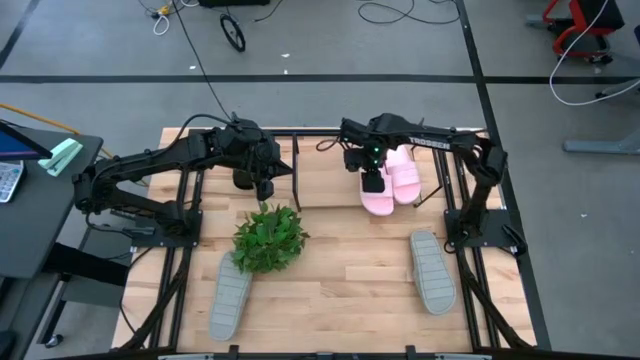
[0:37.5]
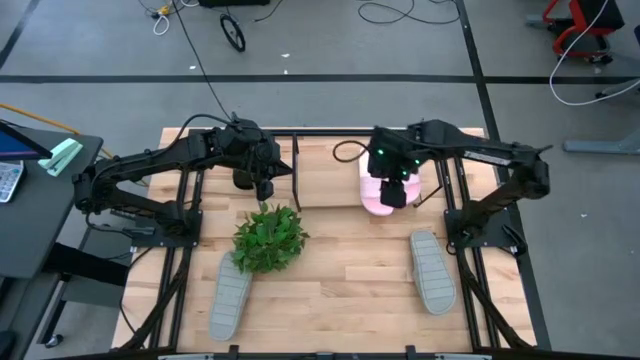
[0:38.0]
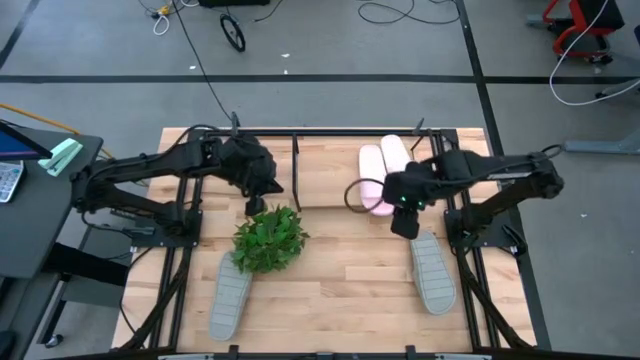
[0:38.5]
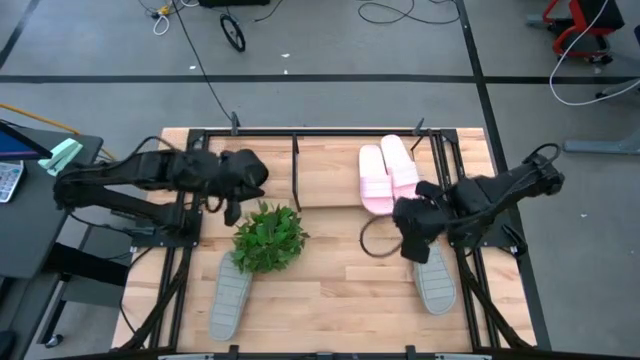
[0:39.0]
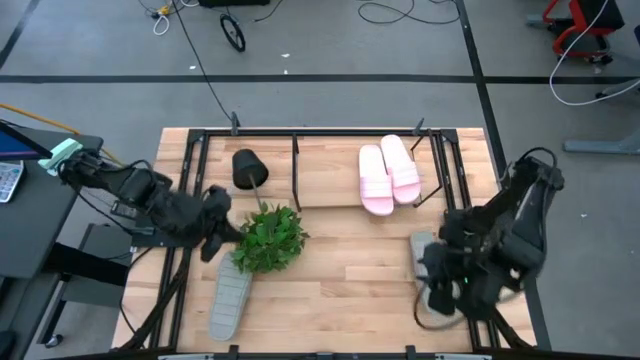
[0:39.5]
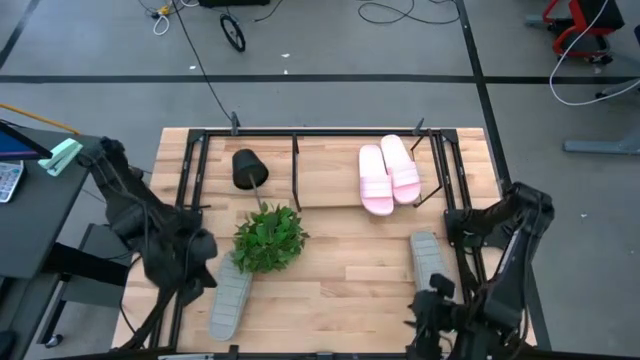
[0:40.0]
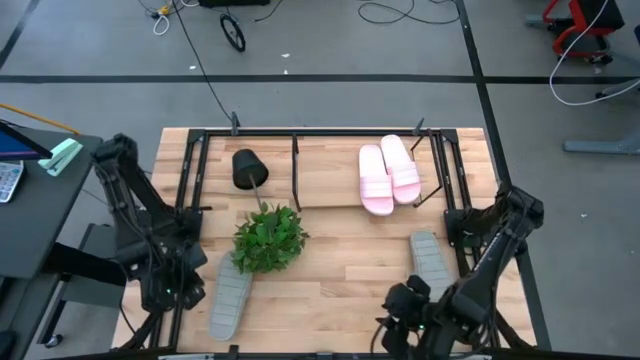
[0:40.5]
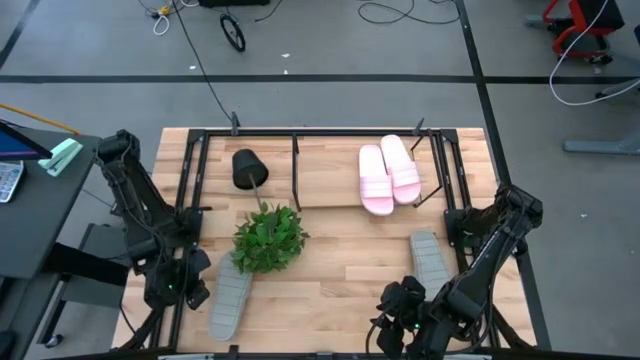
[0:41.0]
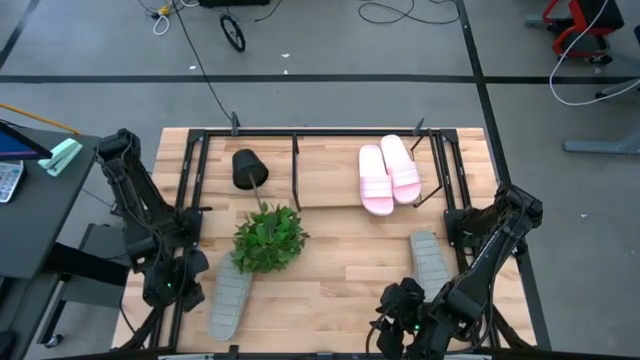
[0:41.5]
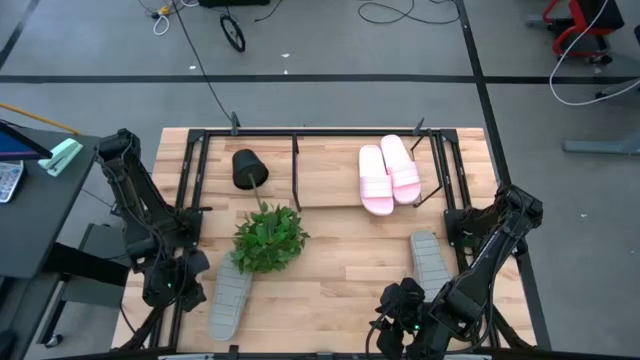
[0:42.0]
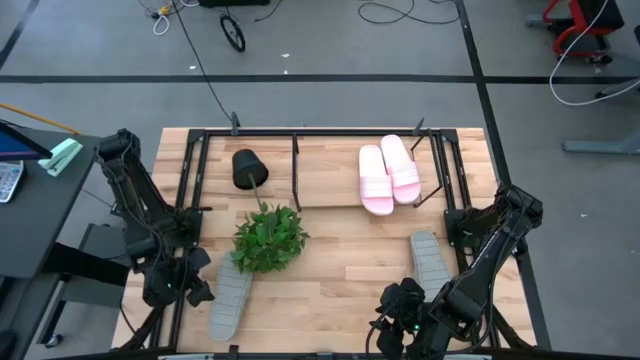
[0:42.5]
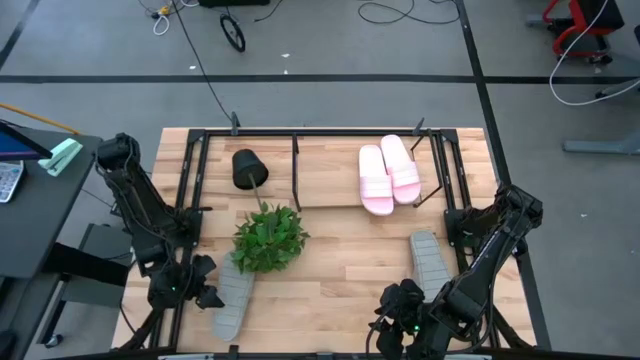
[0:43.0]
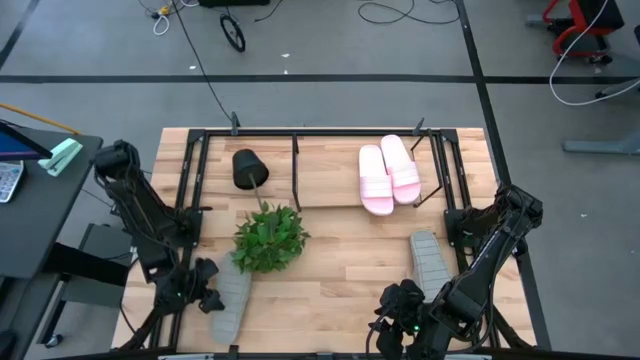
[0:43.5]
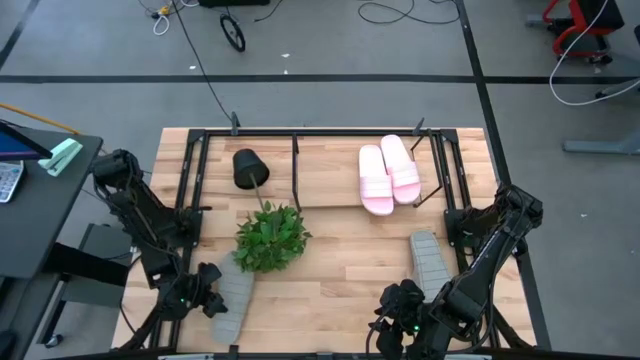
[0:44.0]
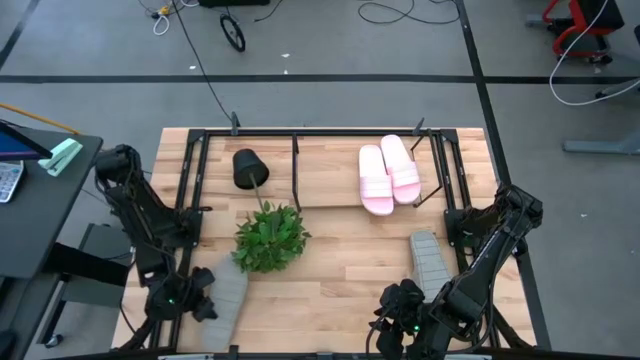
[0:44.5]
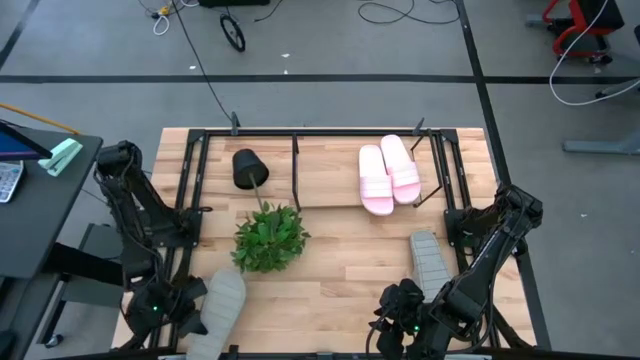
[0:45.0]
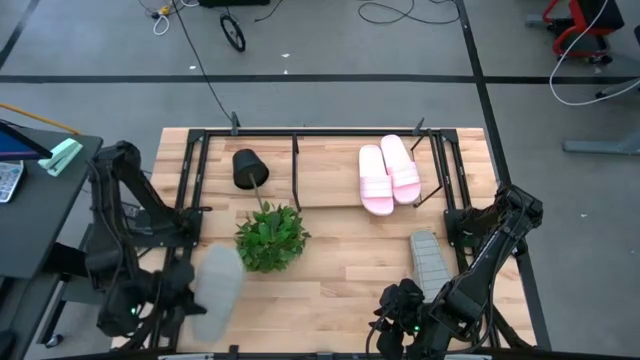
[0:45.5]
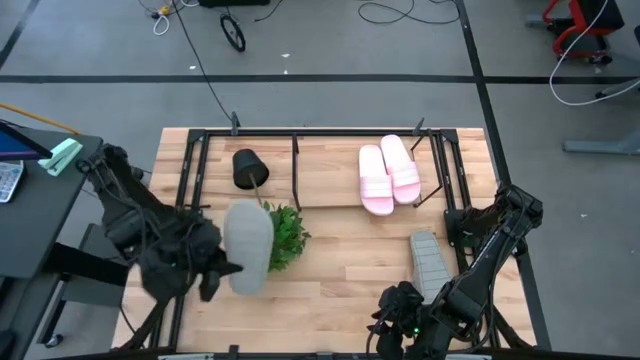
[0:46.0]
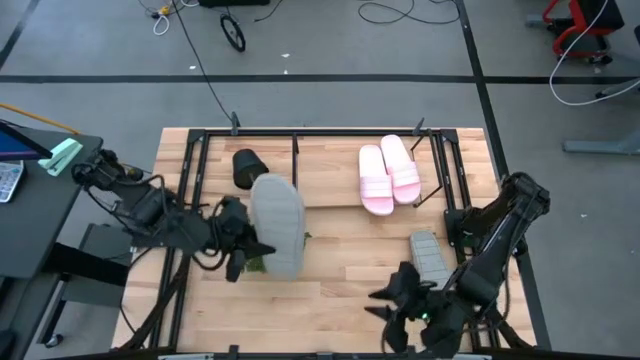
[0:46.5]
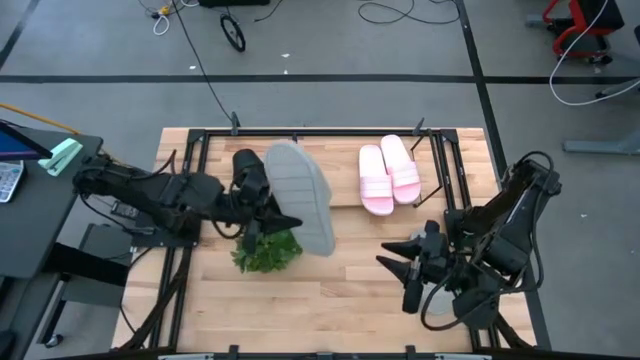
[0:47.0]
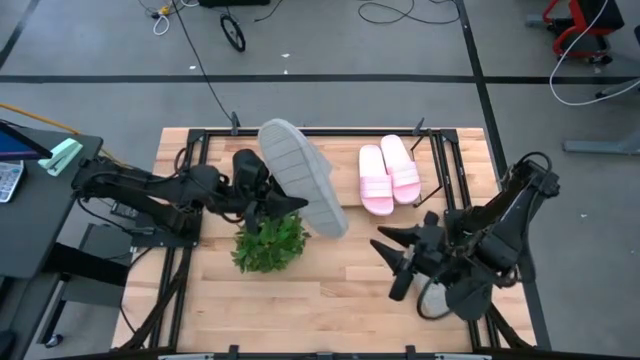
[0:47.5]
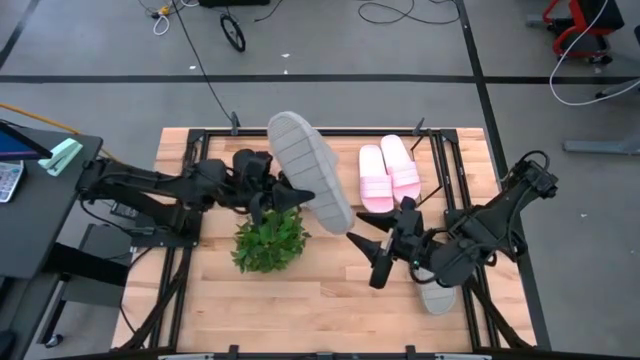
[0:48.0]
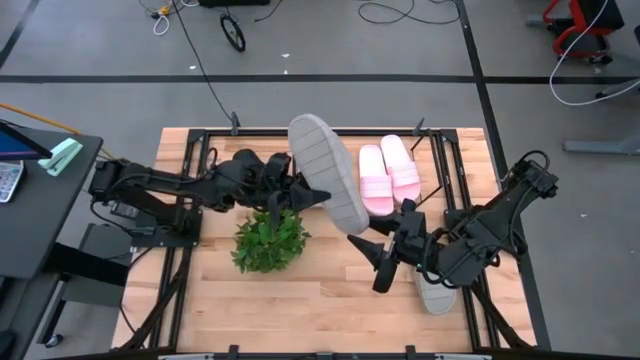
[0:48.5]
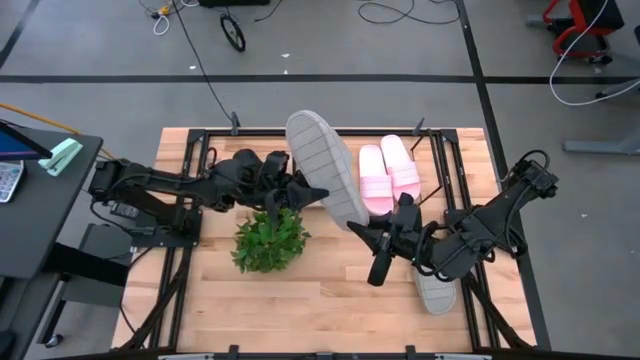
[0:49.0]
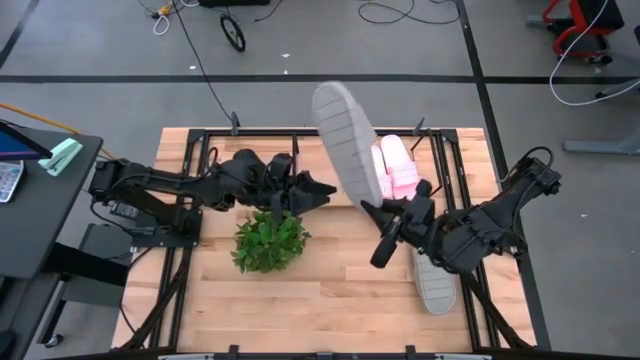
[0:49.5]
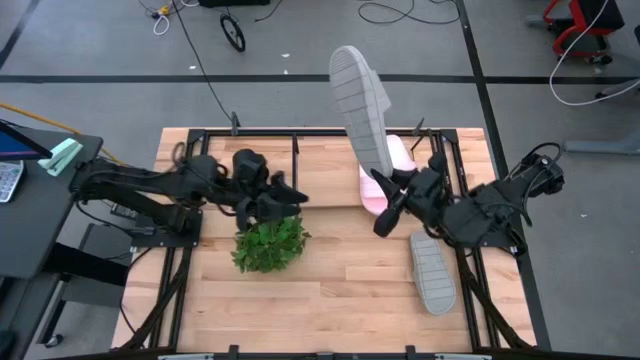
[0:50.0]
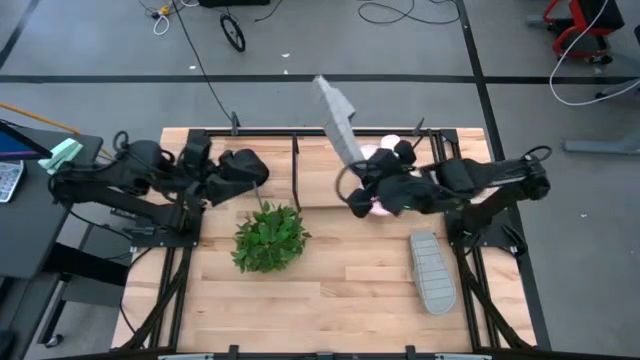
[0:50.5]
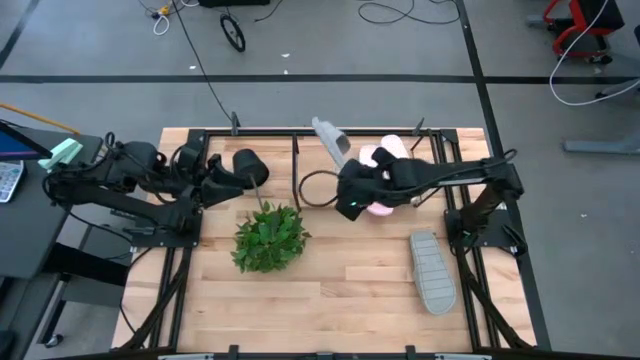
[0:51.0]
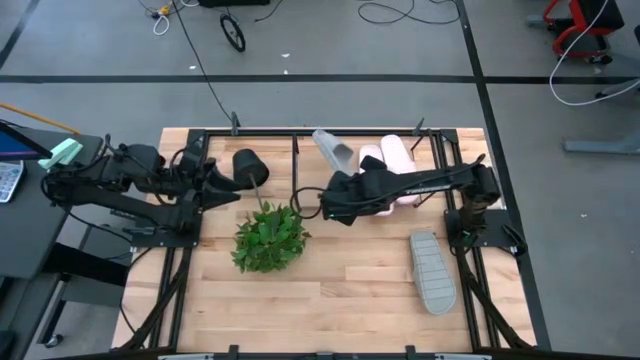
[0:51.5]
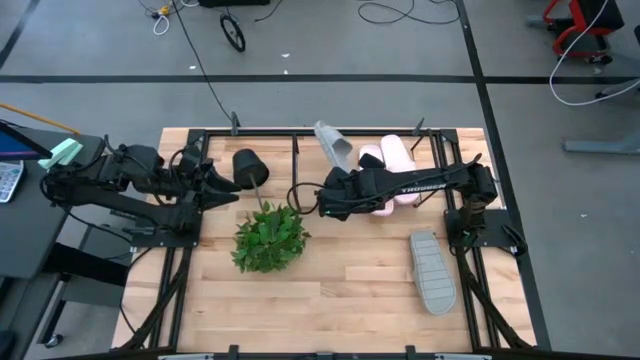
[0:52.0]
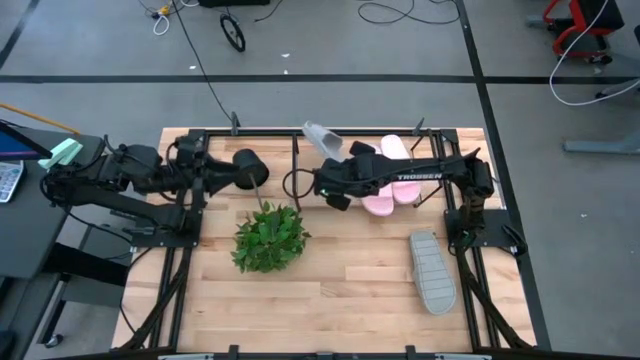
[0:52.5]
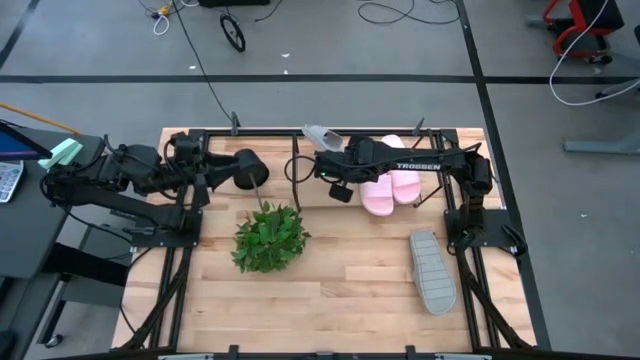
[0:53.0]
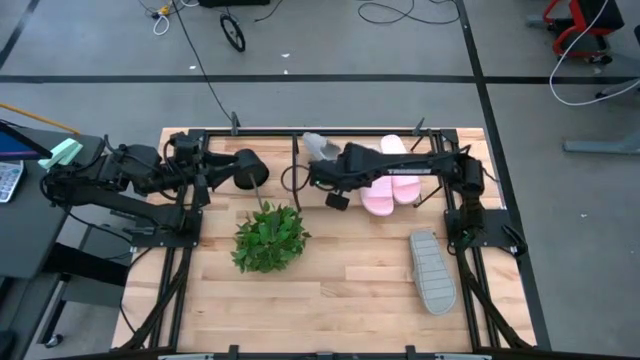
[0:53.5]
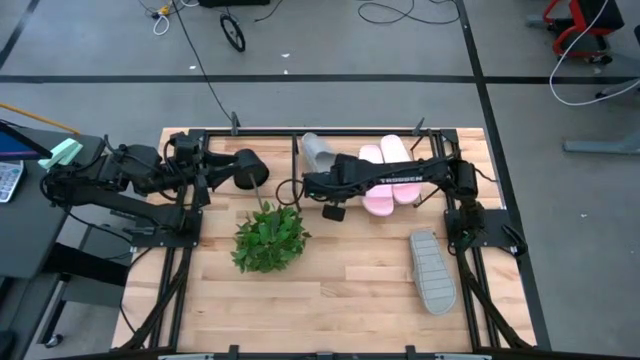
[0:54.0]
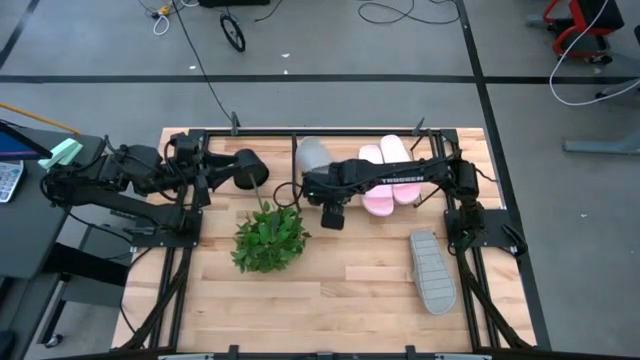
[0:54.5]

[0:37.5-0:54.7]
Task: Pick and place slides into the shelf
Put the left gray slide on the shelf

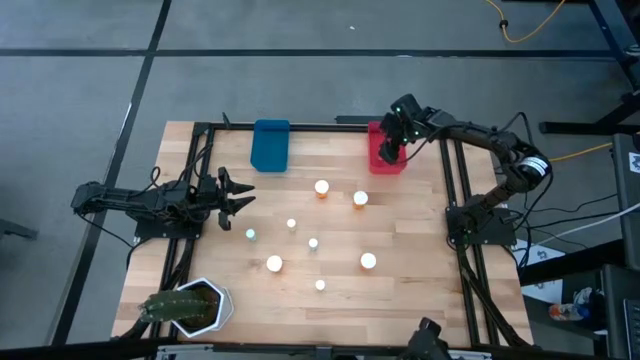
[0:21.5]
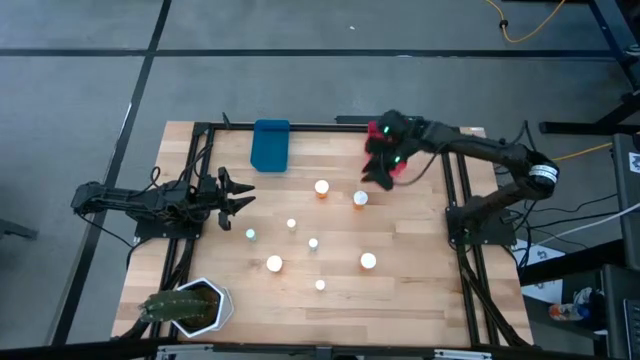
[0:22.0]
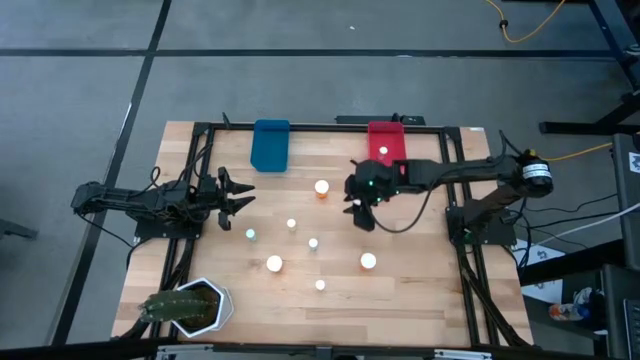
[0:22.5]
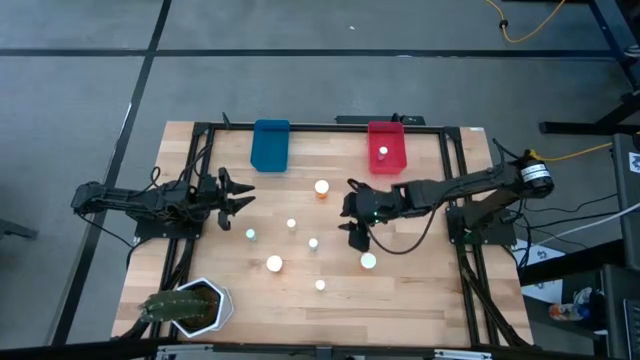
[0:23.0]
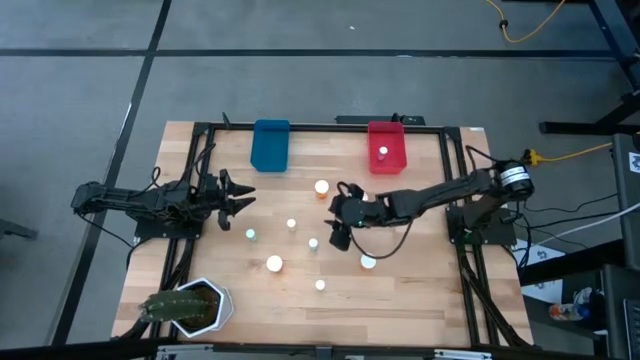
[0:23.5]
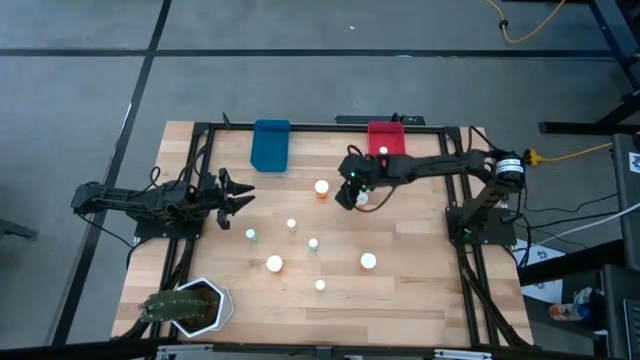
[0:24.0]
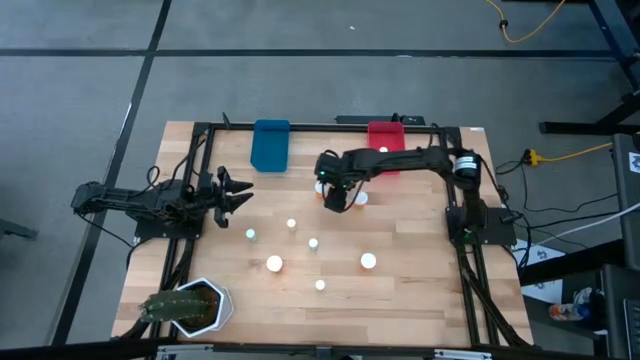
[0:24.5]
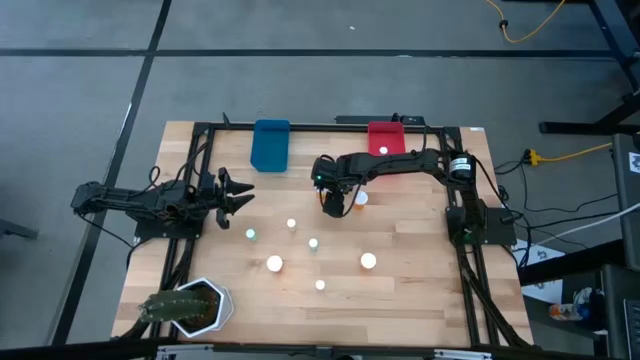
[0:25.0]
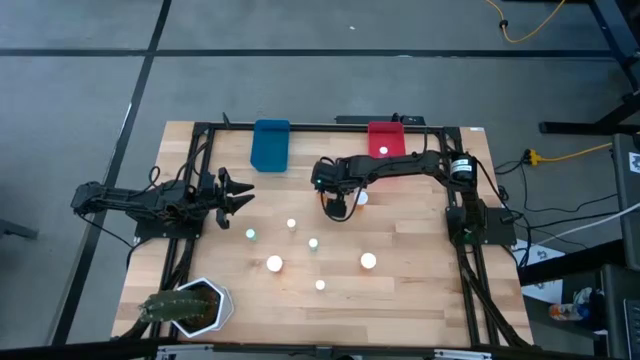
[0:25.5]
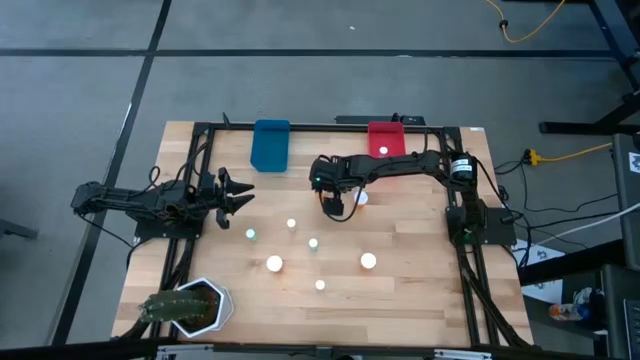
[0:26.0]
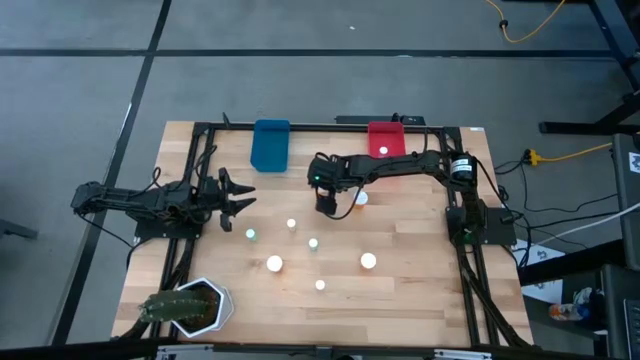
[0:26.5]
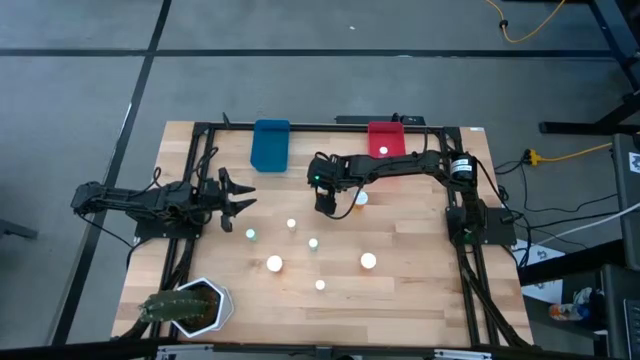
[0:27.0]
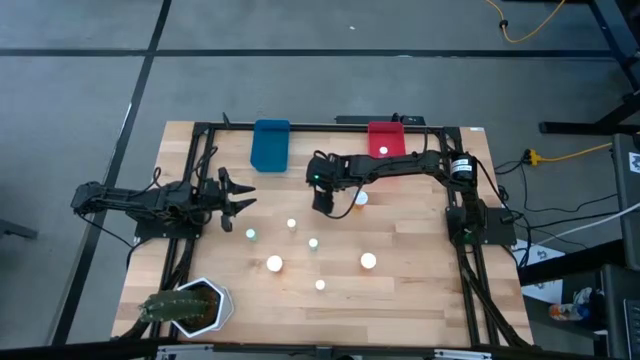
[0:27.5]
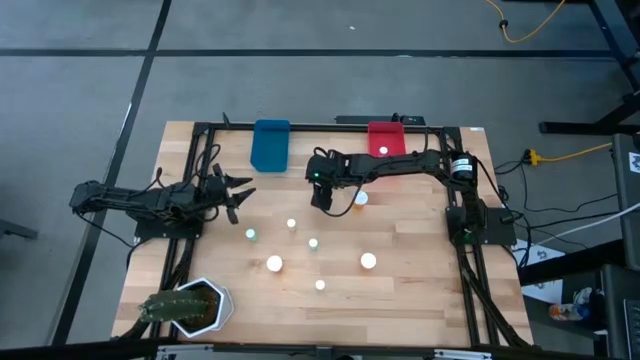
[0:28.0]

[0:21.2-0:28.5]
Task: Pick and place medicine bottles into bin by pill shape (circle, oval)
Put the big orange pill bottle into the blue bin
